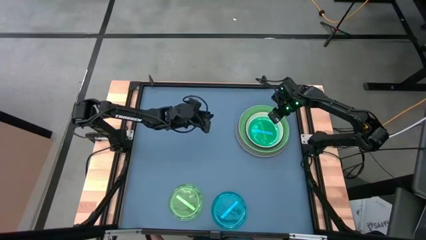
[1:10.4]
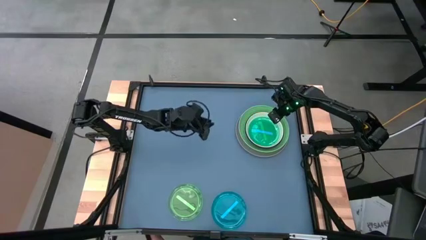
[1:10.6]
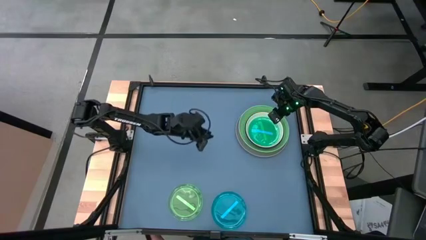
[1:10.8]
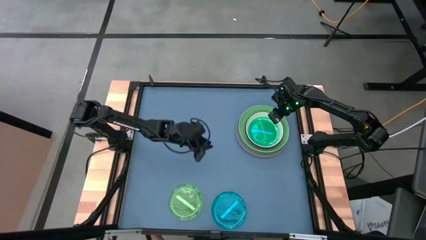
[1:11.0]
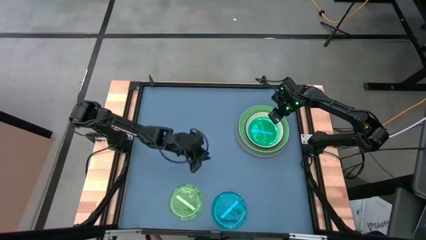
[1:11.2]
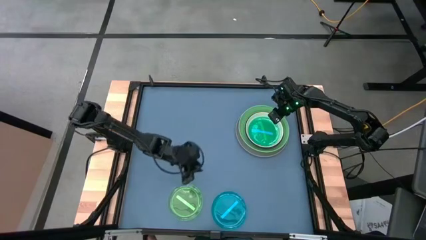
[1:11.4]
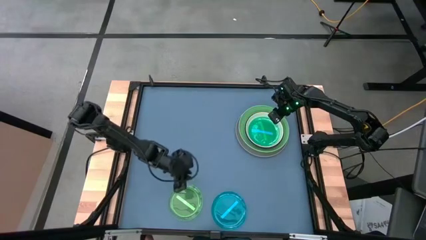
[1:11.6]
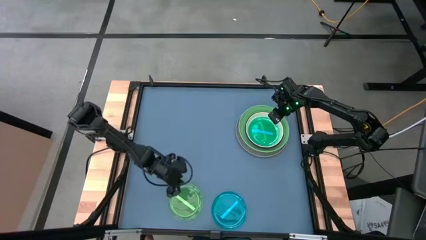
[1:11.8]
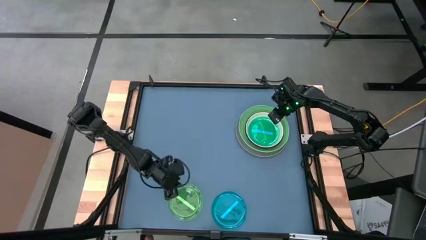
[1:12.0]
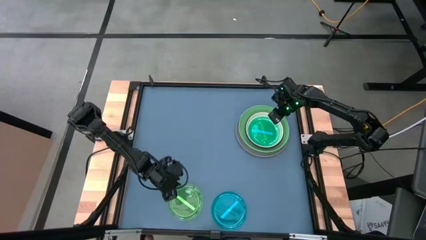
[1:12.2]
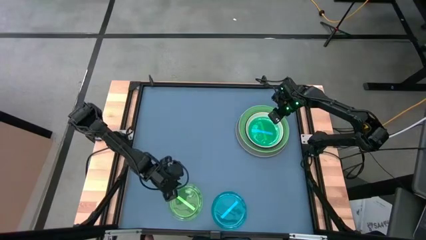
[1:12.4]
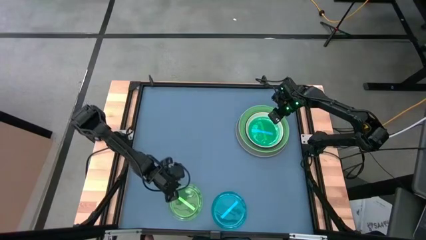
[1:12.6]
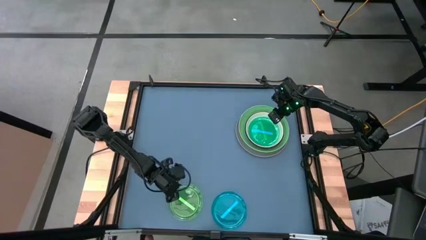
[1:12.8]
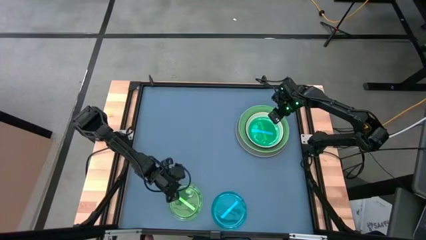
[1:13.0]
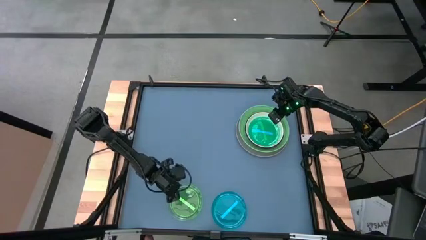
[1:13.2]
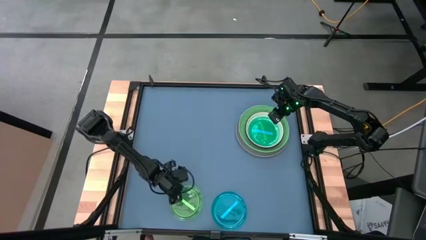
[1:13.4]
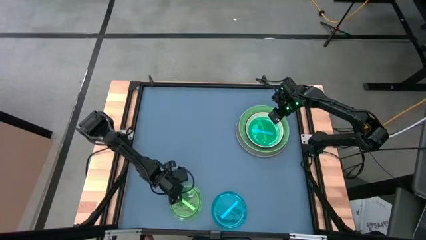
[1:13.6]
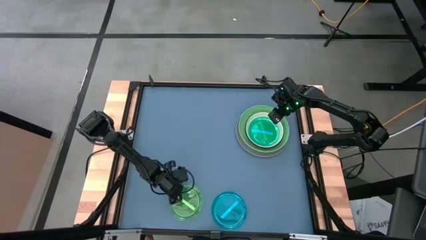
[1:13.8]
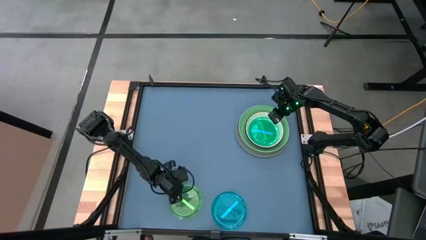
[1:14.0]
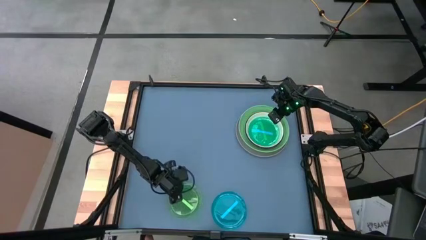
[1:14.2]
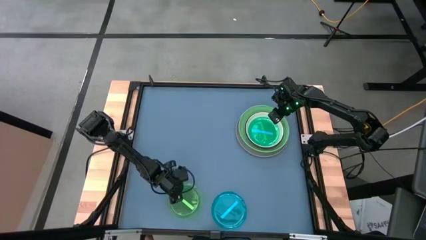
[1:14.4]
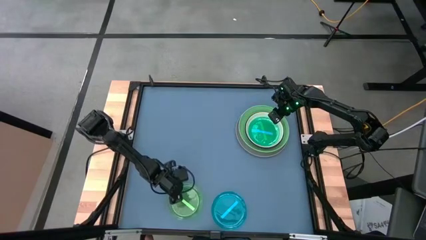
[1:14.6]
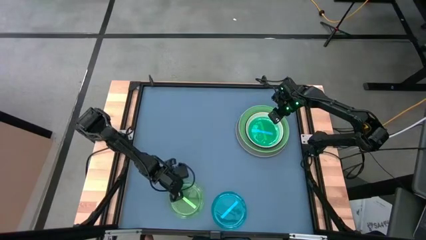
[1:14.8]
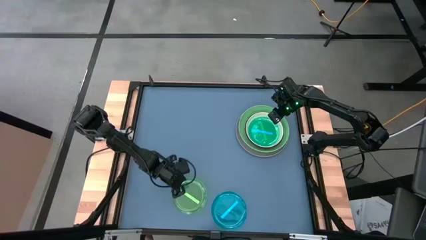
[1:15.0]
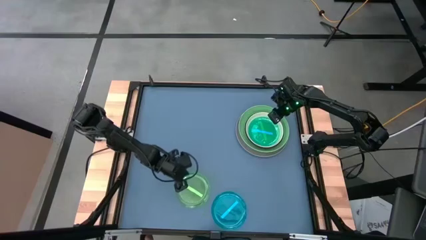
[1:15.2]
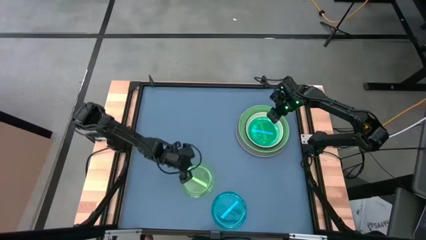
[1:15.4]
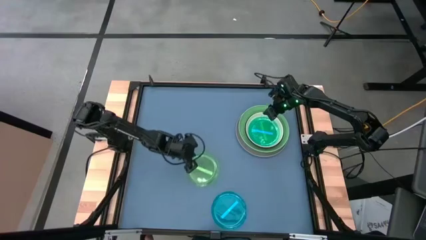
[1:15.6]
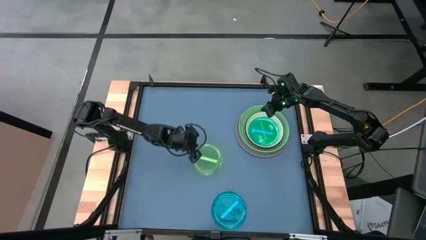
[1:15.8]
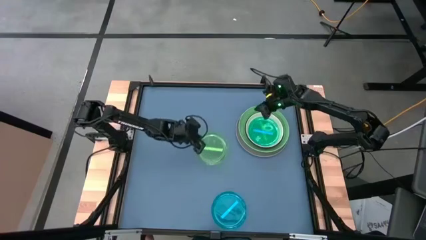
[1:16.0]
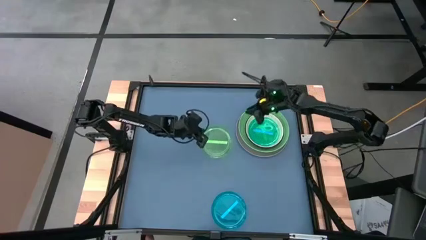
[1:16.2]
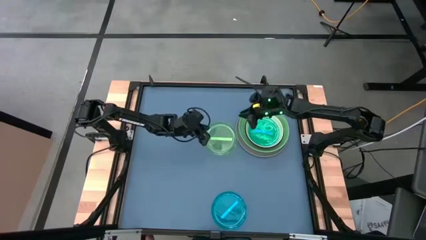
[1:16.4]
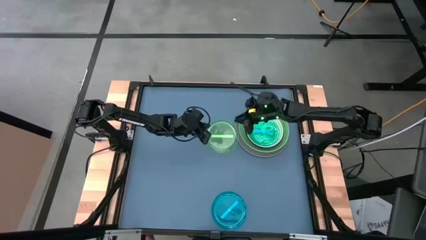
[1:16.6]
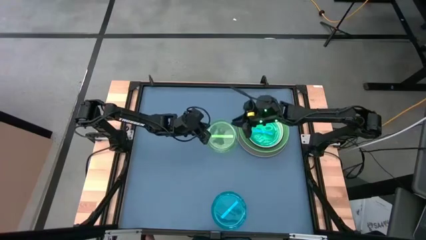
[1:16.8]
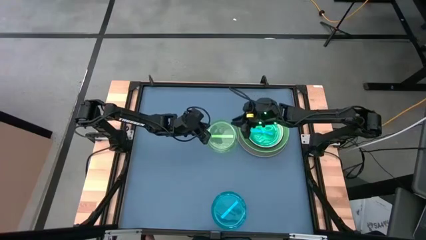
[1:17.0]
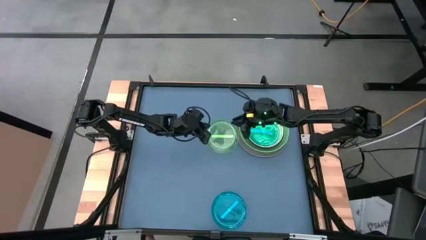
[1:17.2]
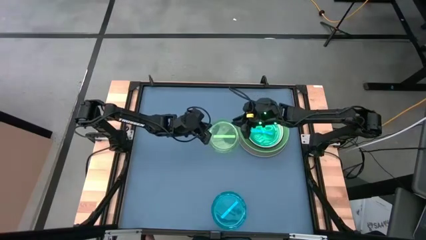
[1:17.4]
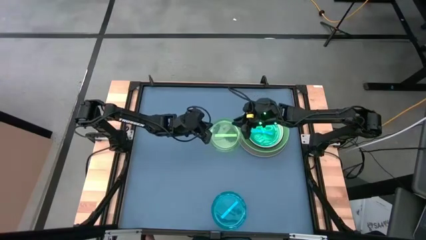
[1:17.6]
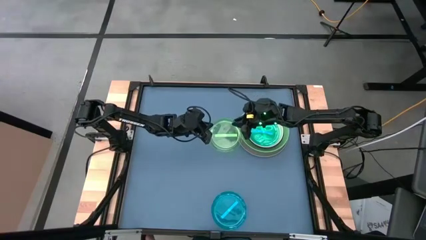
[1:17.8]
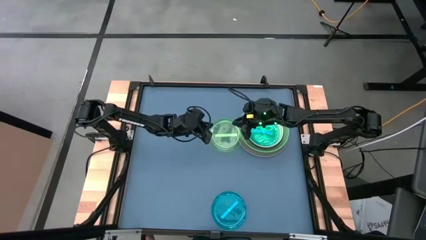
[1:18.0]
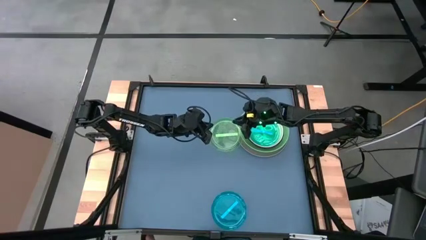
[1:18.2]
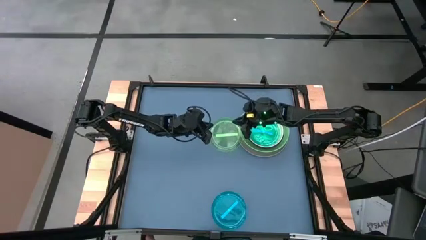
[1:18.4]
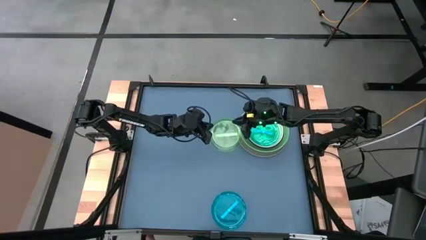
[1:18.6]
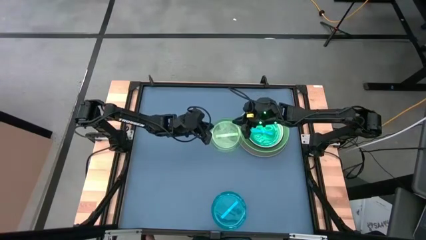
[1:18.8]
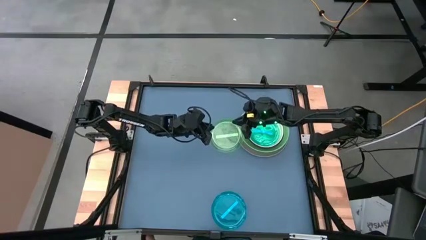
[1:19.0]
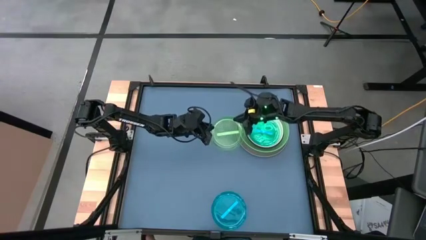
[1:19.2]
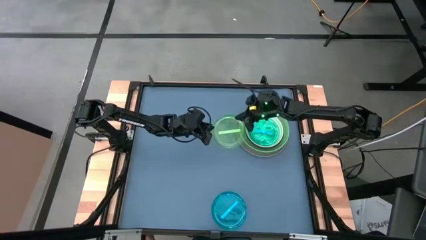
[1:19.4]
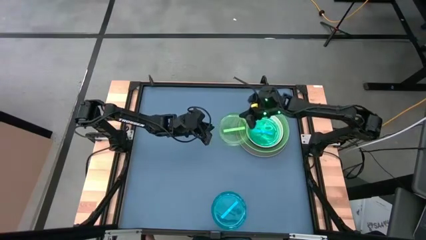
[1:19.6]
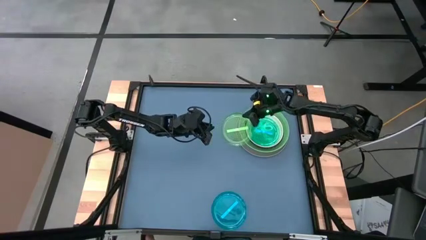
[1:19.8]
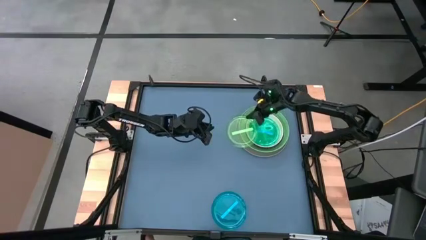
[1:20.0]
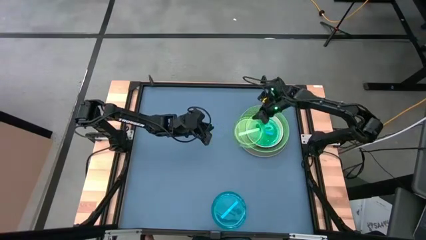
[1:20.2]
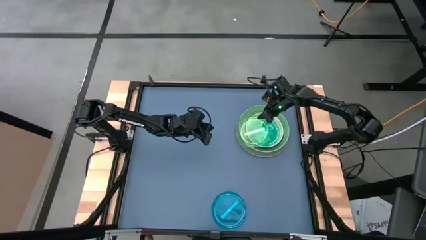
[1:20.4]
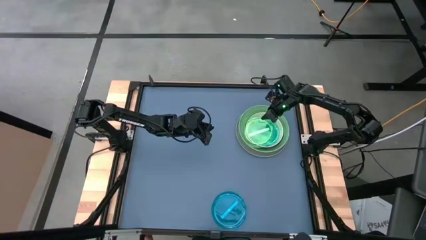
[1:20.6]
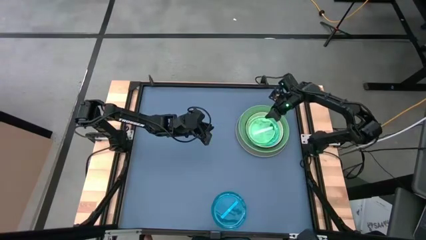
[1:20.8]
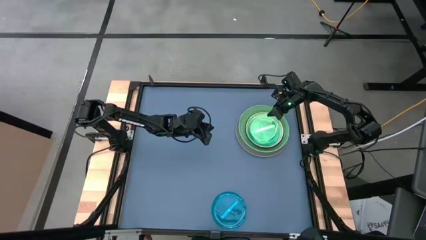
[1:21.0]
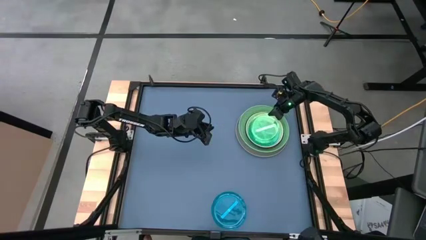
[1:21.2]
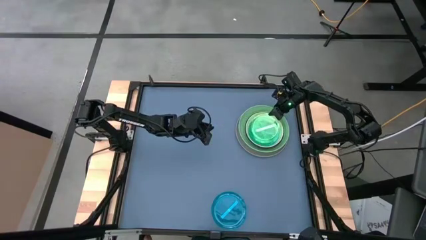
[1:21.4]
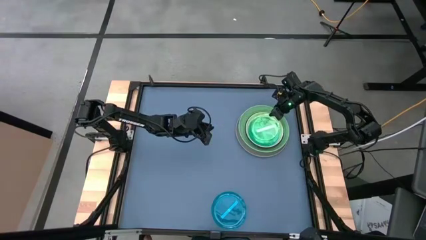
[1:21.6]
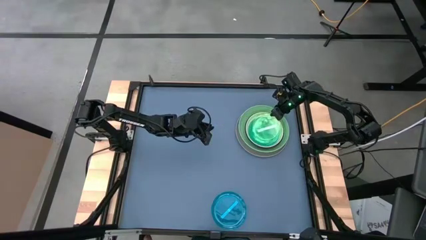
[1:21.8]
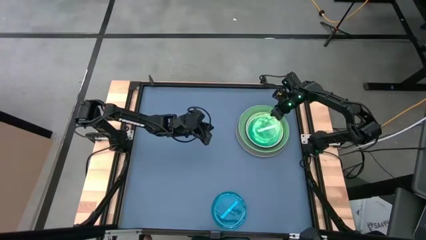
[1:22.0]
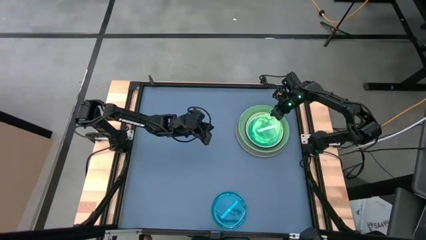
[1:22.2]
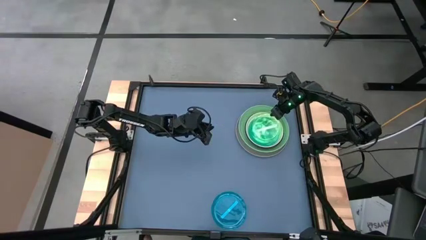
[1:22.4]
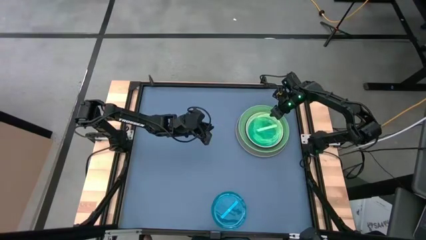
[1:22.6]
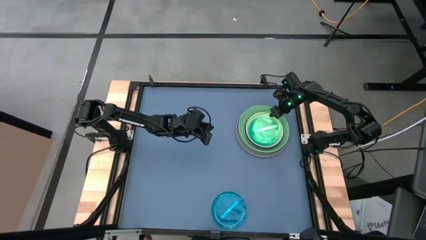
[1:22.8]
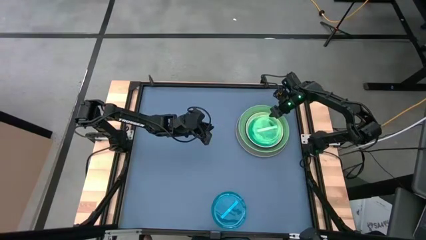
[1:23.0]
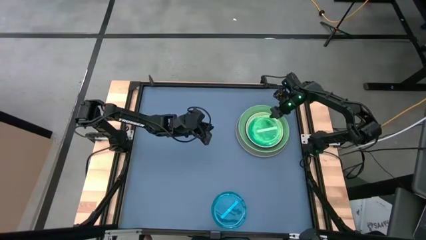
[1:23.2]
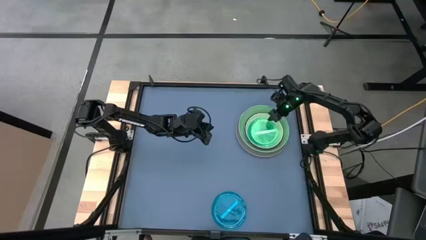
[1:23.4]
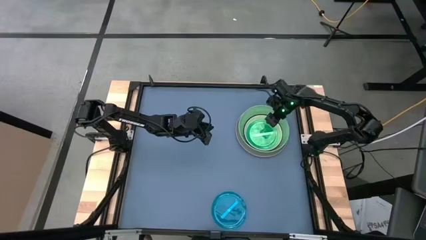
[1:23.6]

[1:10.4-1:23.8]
Task: Stack plastic plates
Stack the small light green plate on the small light blue plate
